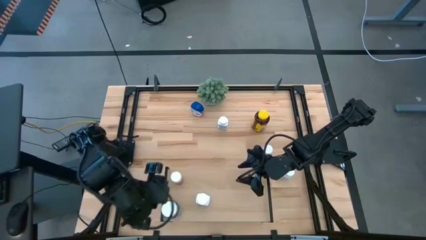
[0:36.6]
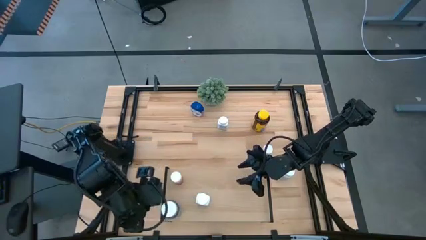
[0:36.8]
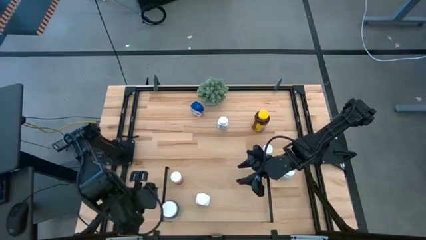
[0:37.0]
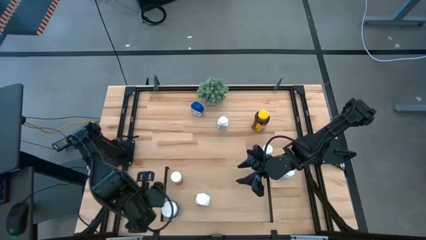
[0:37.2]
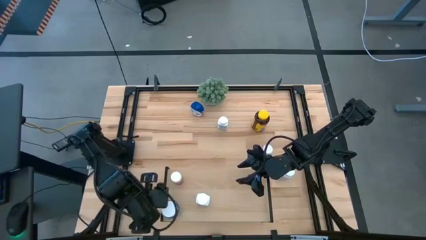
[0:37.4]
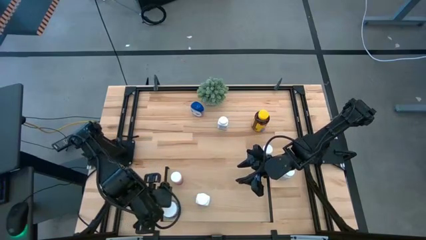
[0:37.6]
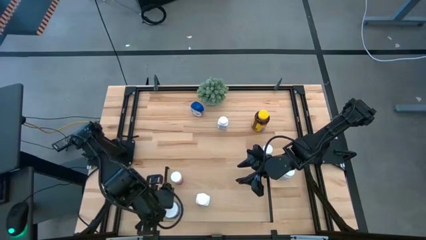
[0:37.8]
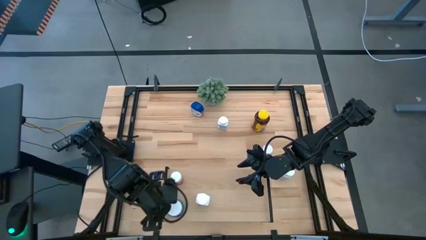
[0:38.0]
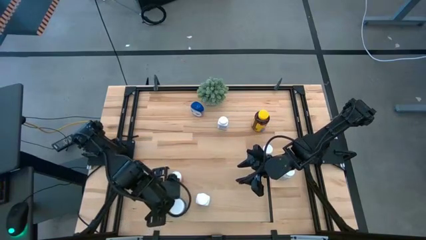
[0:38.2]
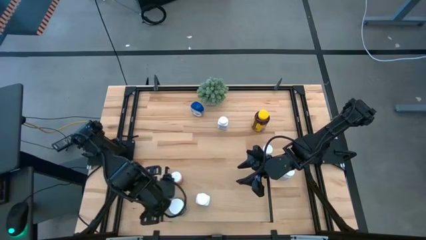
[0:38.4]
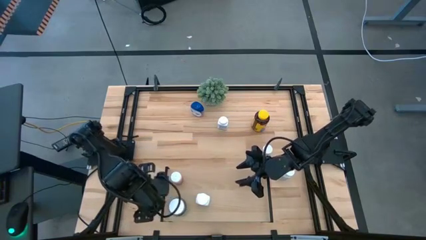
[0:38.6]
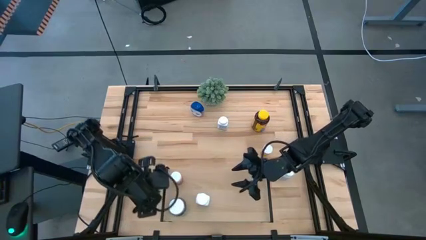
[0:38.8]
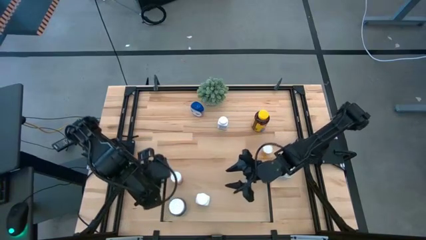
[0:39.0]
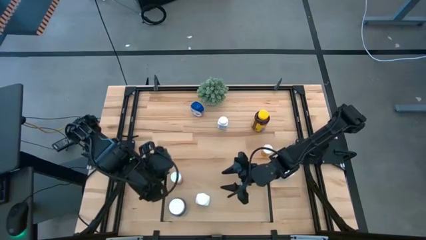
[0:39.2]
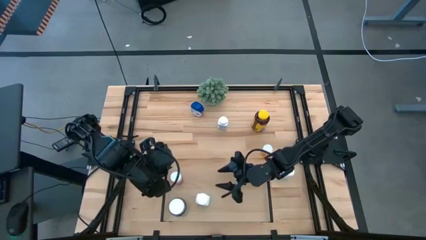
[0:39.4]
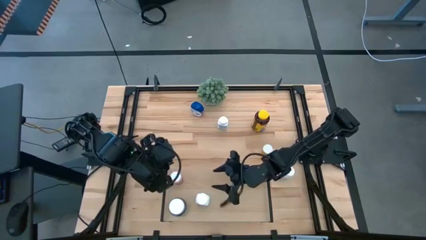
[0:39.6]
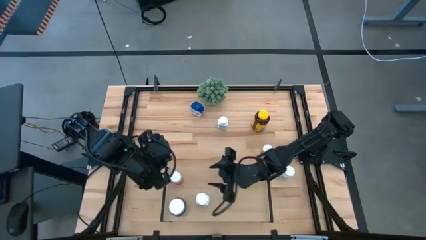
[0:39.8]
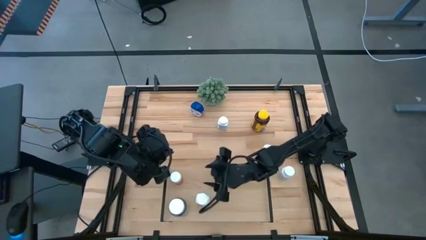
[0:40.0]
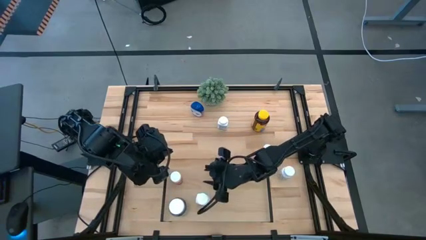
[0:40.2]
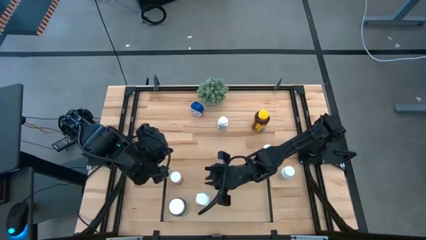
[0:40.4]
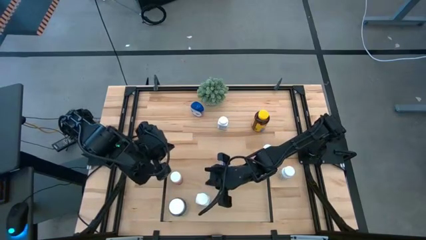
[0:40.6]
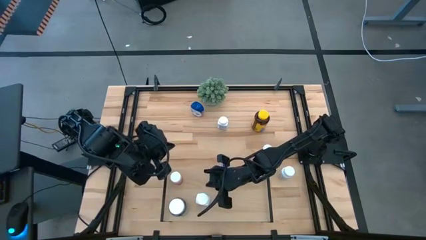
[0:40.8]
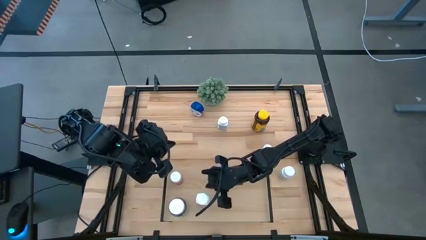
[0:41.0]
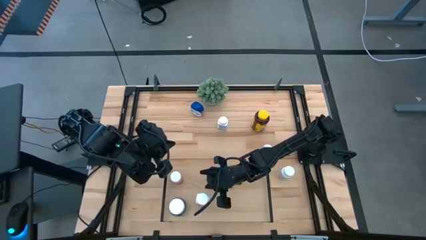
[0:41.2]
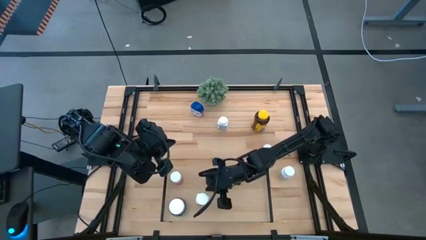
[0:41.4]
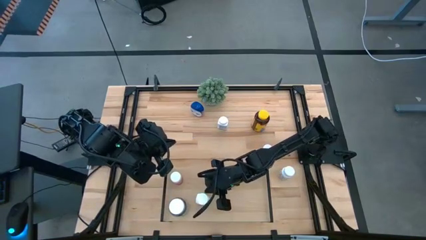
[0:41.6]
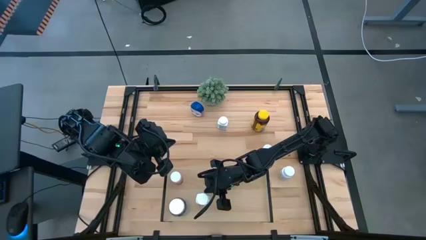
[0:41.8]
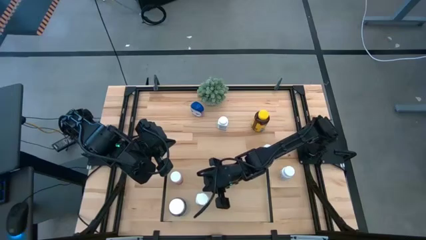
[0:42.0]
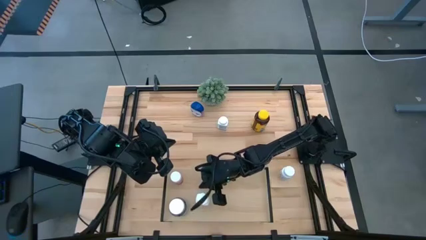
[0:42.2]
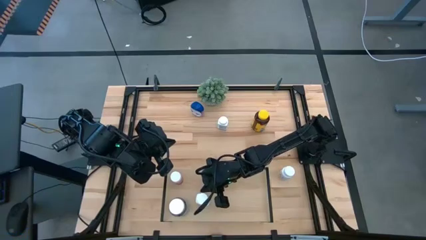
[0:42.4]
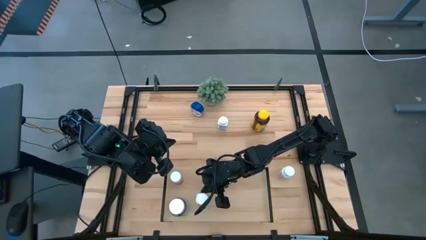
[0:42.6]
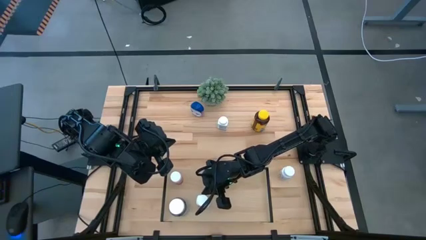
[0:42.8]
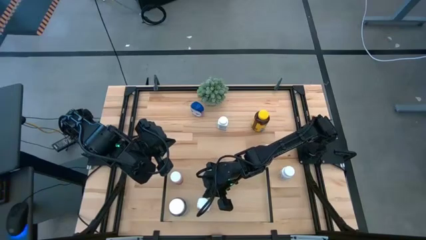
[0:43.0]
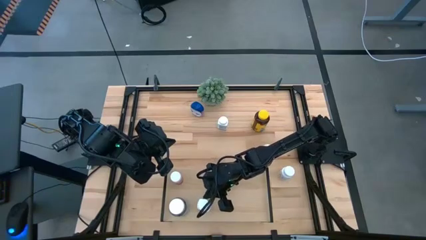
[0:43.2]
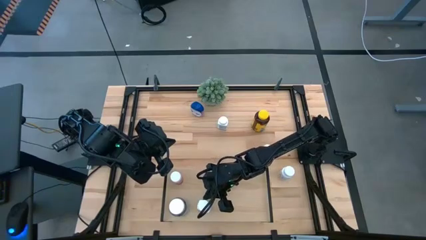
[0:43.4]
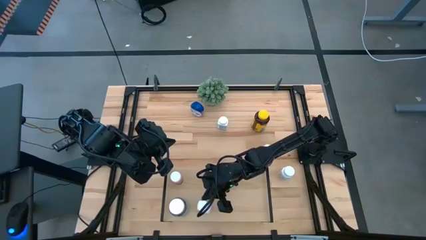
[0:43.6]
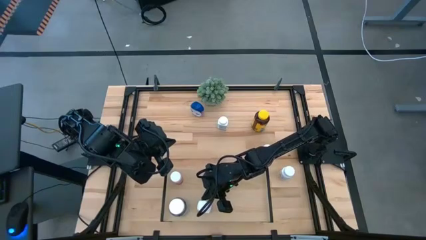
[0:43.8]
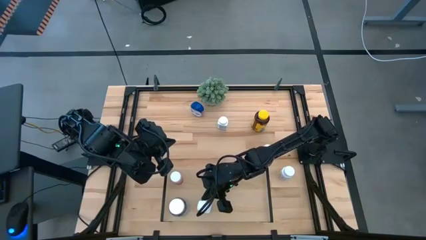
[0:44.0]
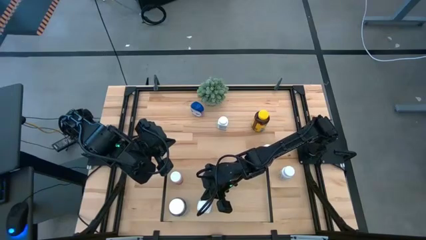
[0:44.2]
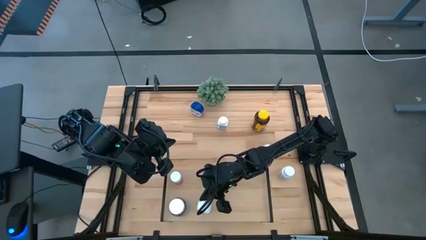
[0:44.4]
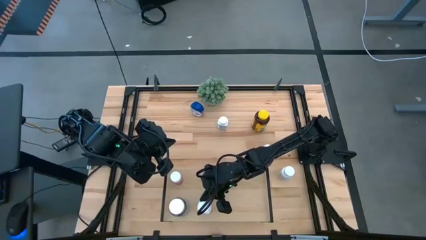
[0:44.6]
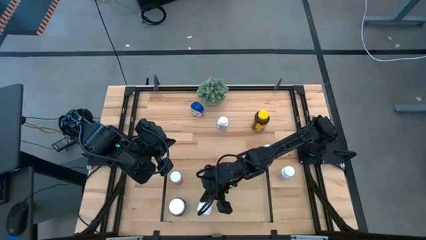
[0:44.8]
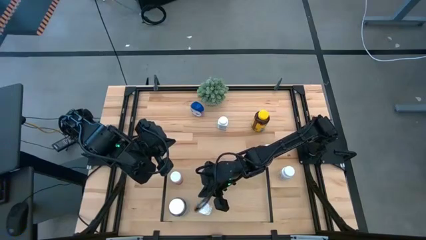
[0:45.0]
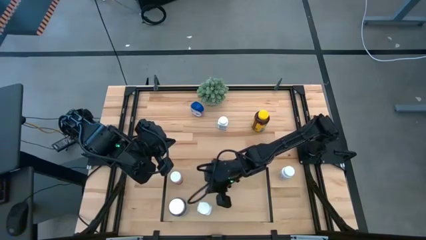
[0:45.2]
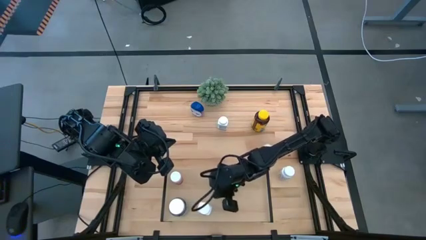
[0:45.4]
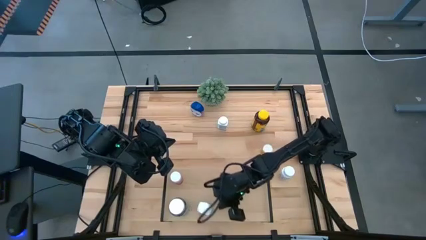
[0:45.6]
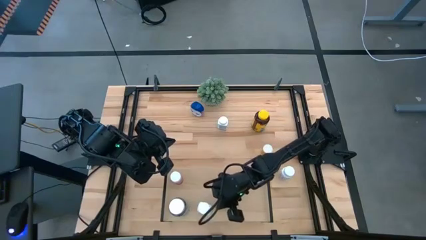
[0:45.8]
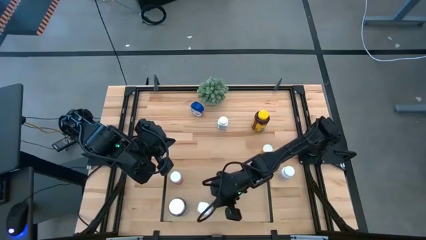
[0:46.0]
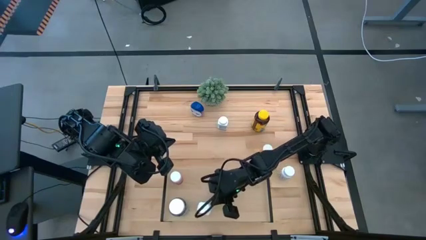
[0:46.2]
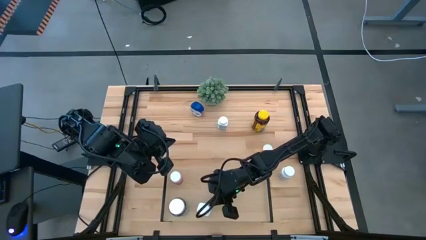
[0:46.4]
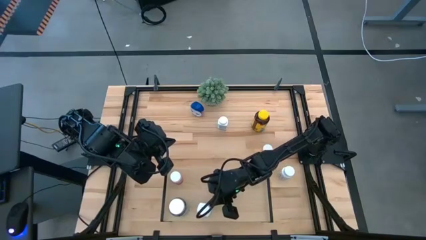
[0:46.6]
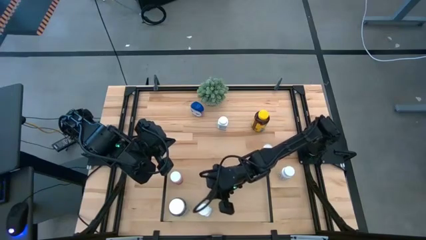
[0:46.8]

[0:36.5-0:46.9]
Task: Pick and place medicine bottles onto shelf by color
Put the left white pill bottle on the shelf
